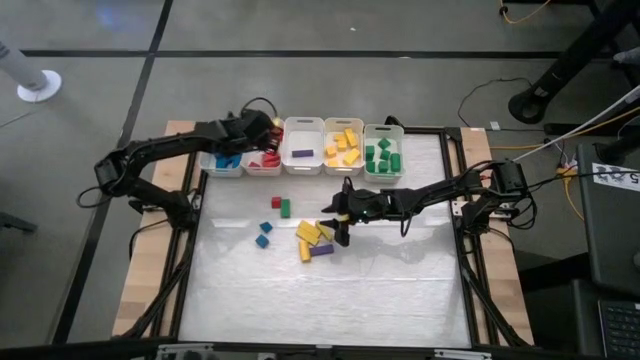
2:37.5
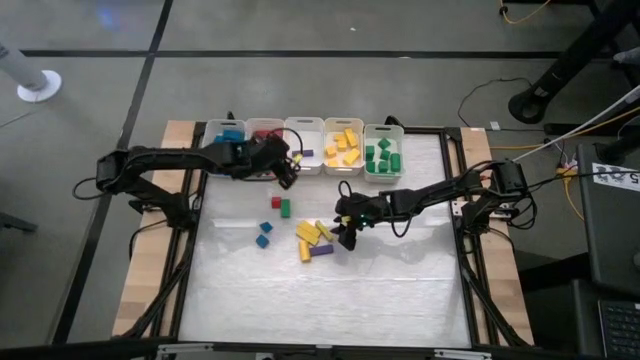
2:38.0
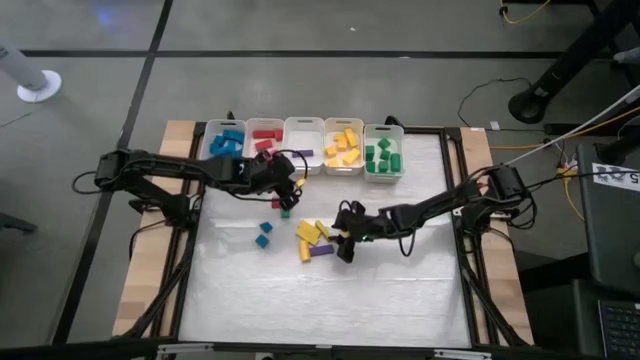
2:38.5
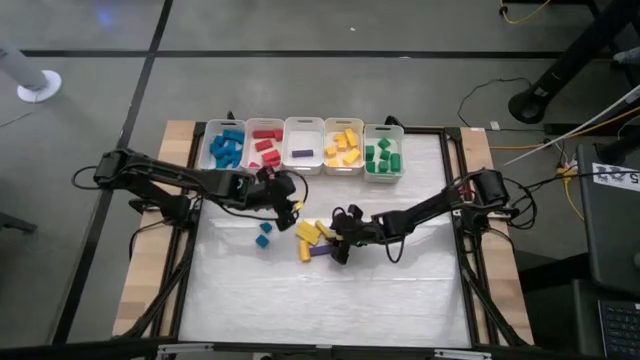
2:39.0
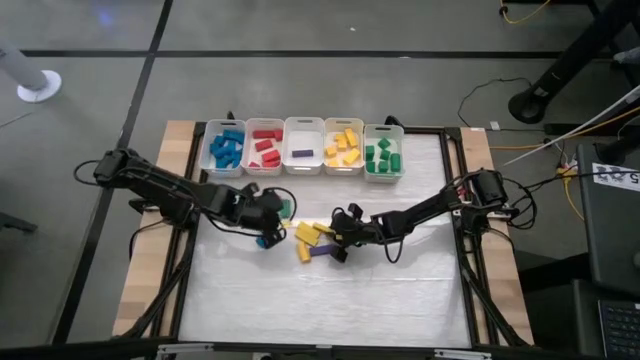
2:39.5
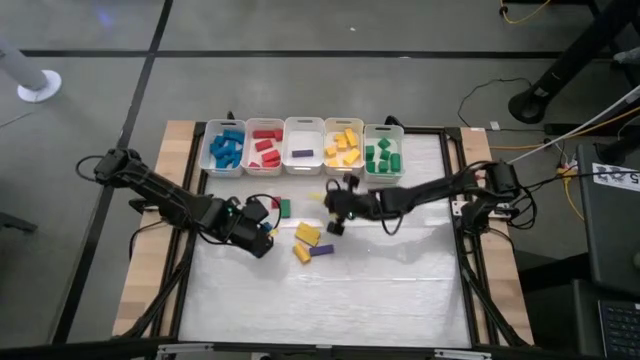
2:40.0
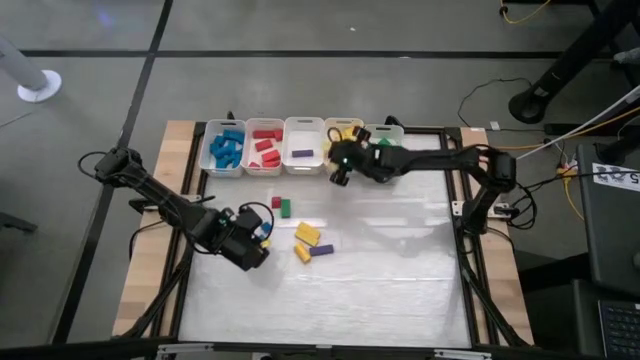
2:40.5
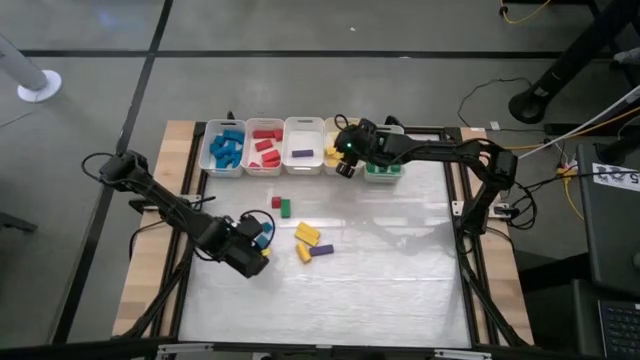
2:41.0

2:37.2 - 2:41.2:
Task: Sort blocks
Put the yellow block into the middle right white bin

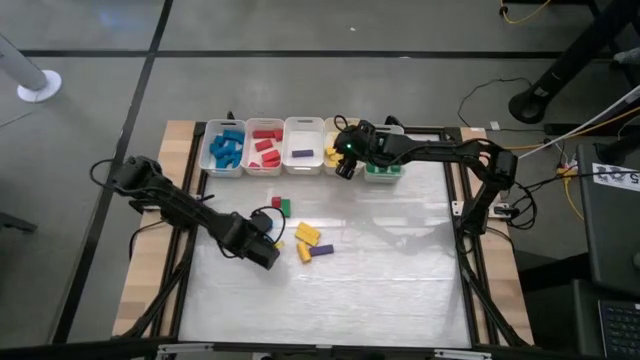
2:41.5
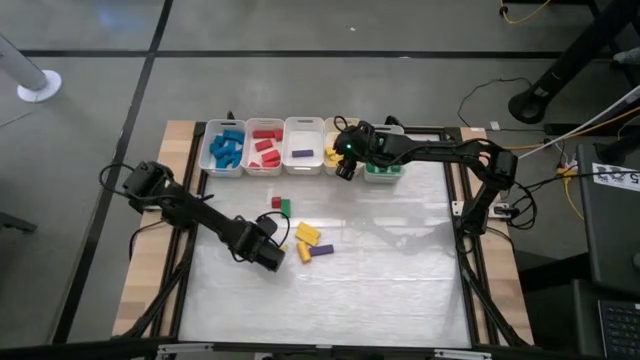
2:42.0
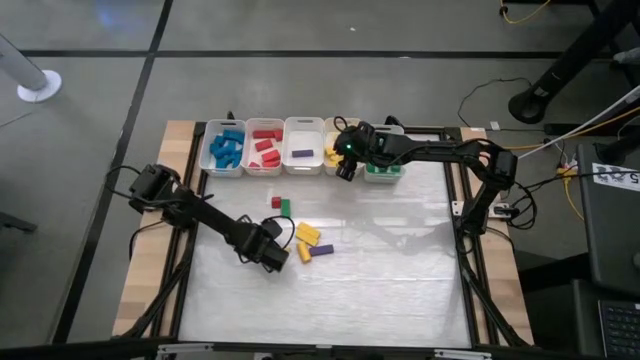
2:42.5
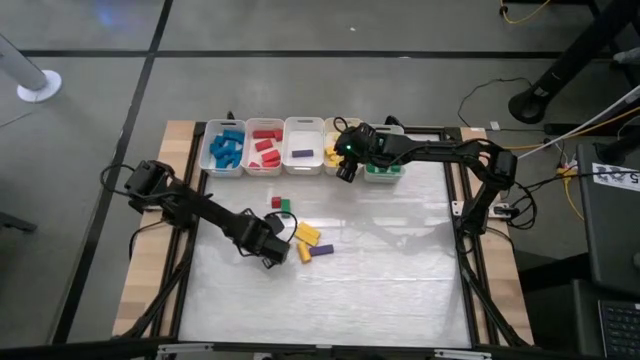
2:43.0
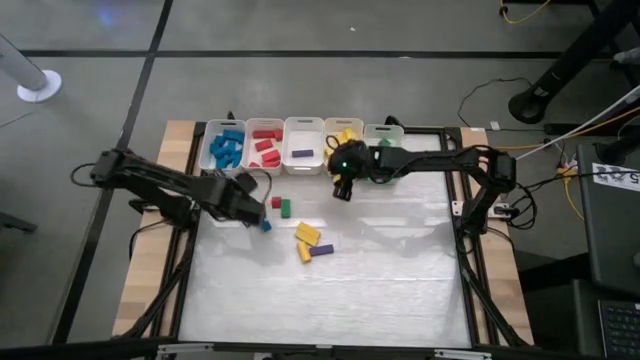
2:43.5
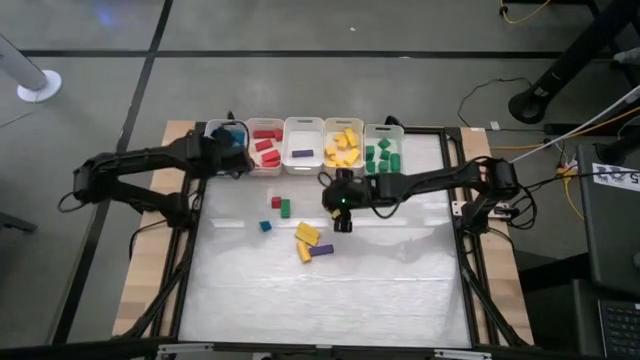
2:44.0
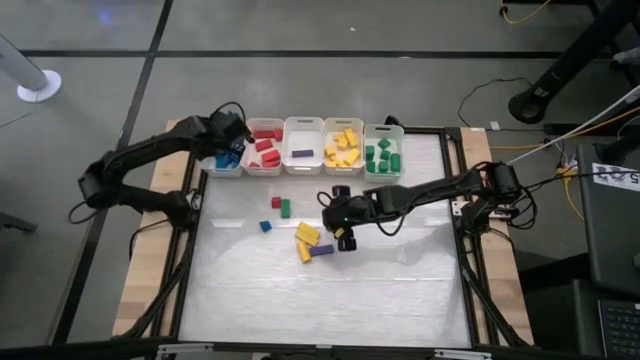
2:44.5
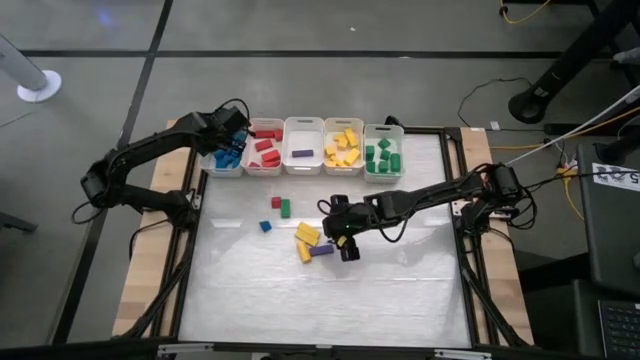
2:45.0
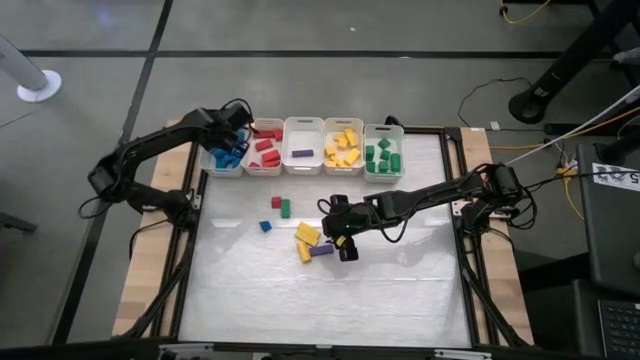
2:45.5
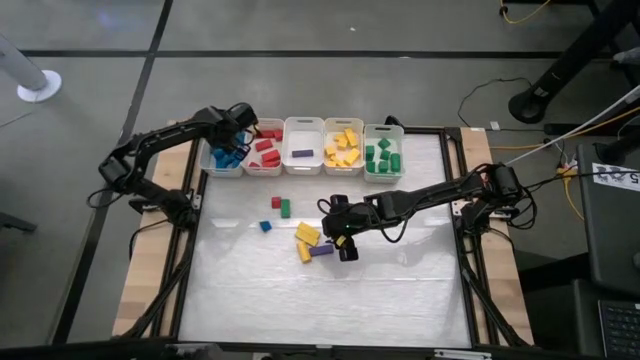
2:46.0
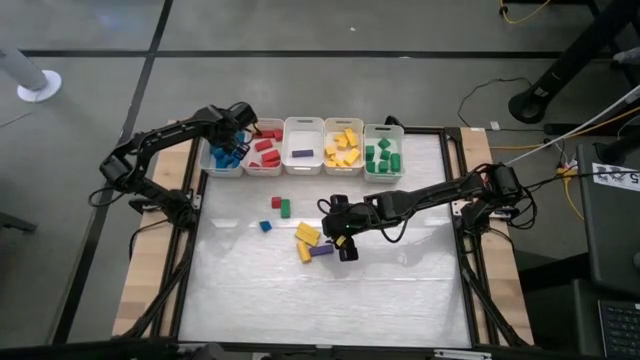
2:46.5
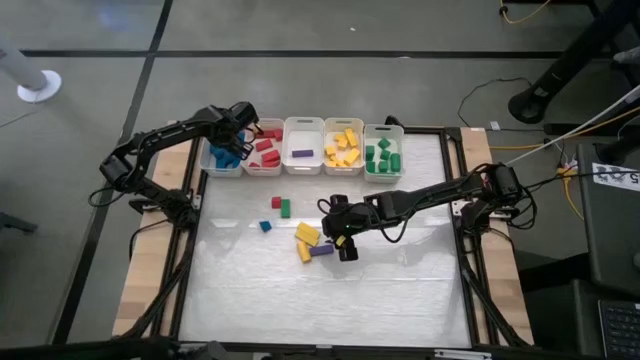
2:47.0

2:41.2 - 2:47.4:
Put the blue block into the left white bin

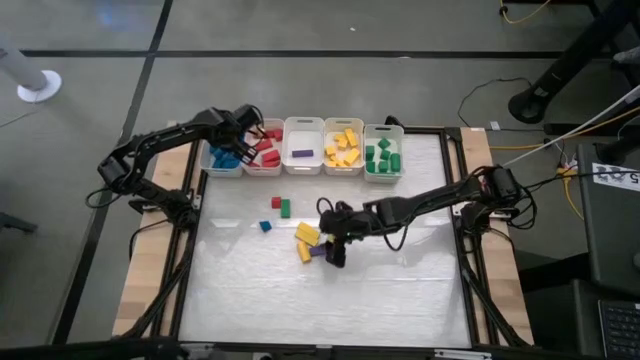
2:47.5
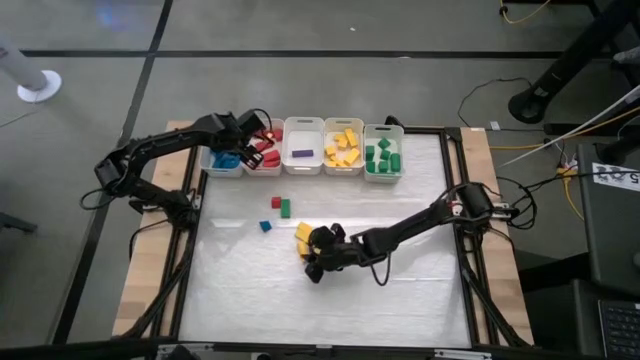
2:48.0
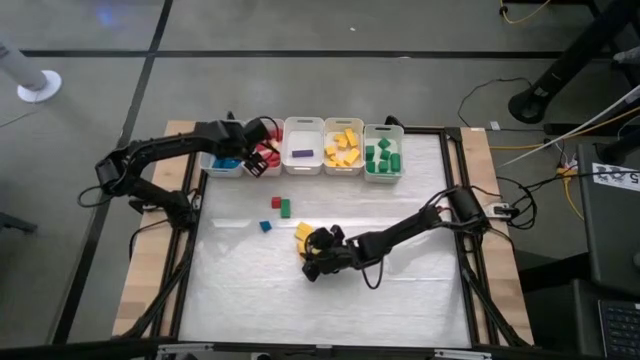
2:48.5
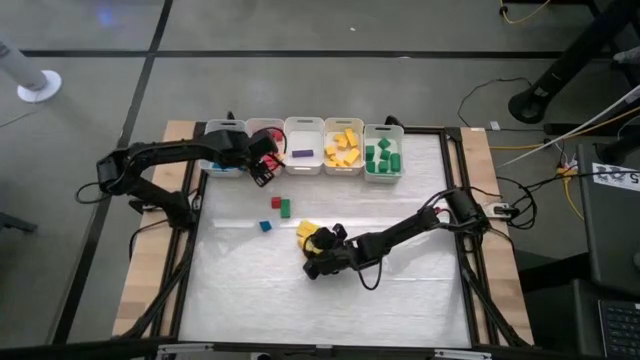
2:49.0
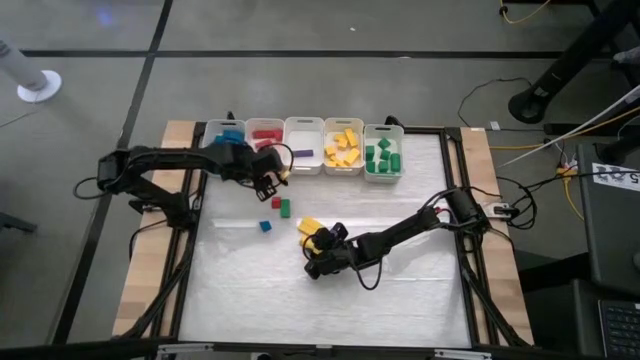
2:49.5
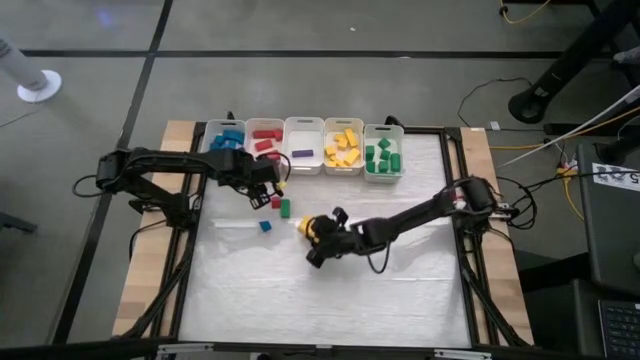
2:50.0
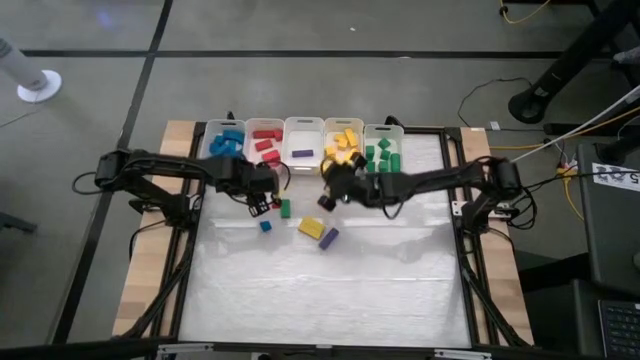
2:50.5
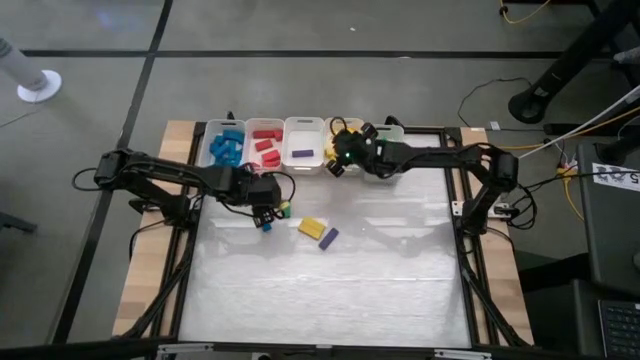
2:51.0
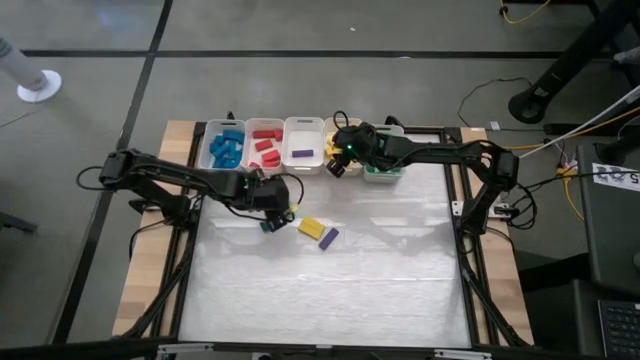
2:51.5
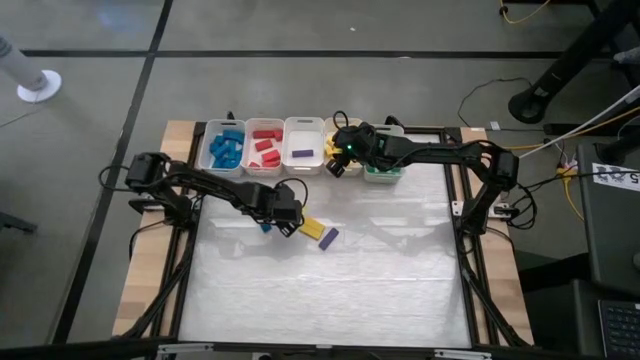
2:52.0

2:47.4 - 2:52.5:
Put the yellow block into the middle right white bin

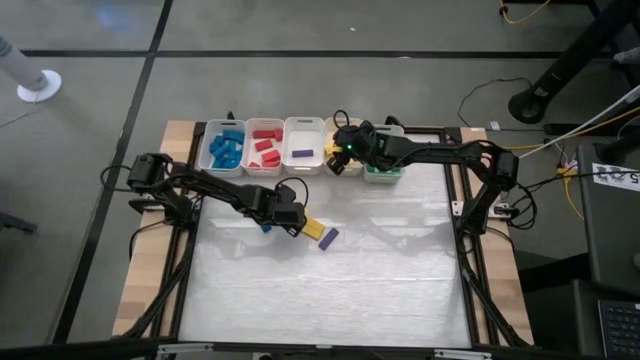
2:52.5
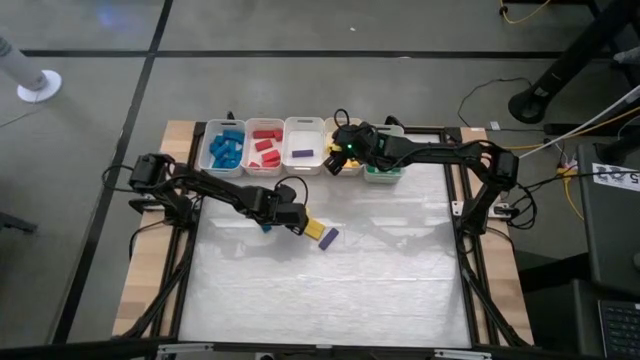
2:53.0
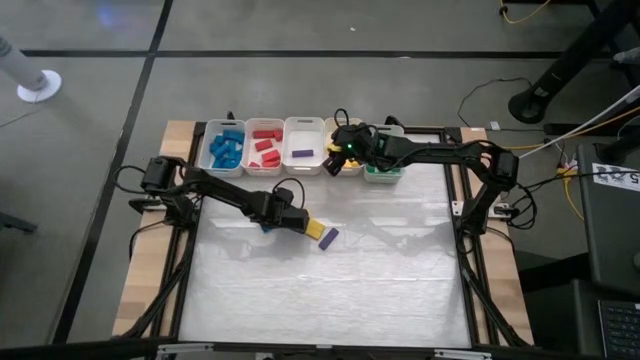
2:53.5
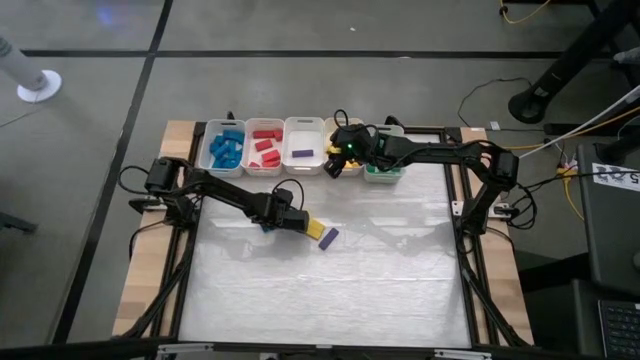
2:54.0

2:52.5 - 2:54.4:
Put the green block into the white bin

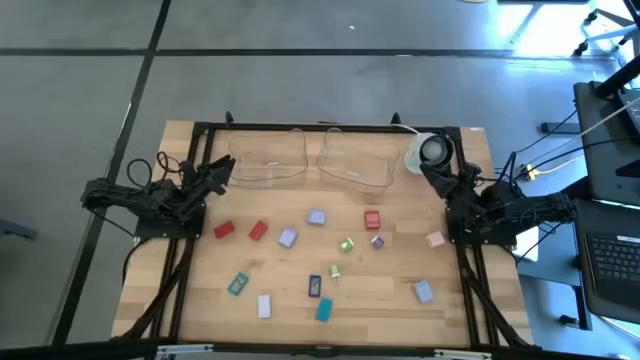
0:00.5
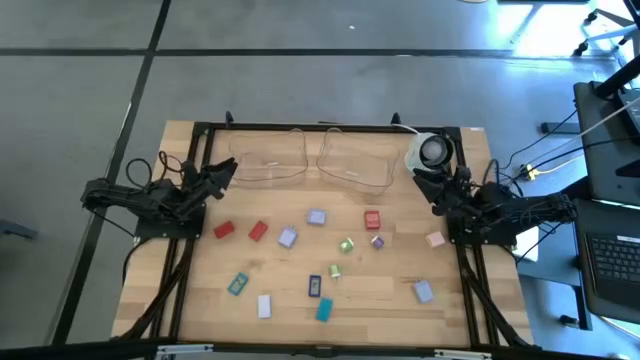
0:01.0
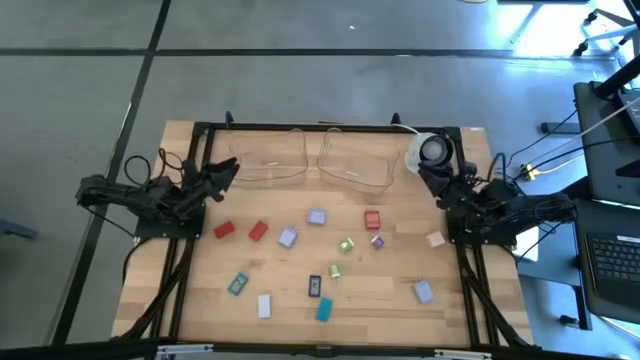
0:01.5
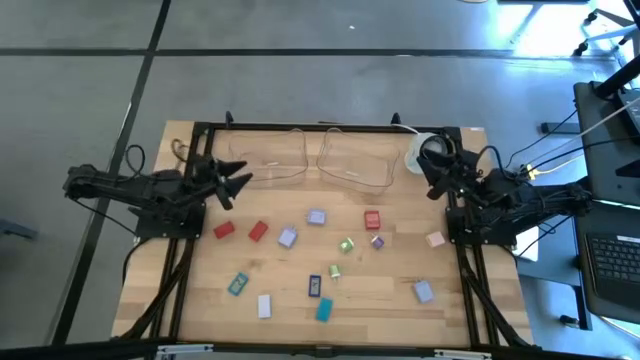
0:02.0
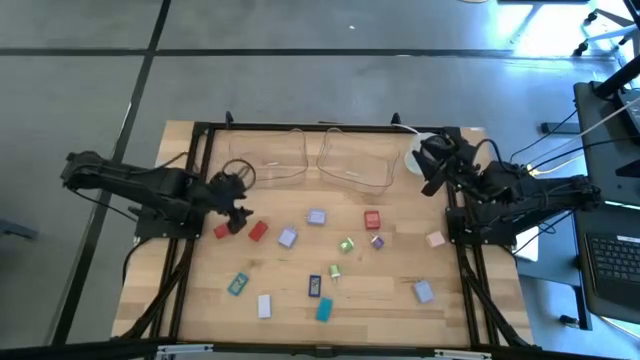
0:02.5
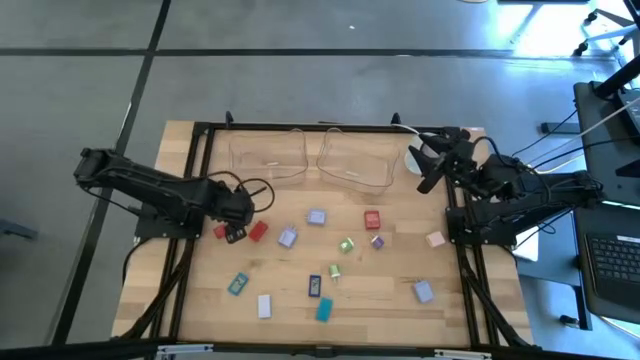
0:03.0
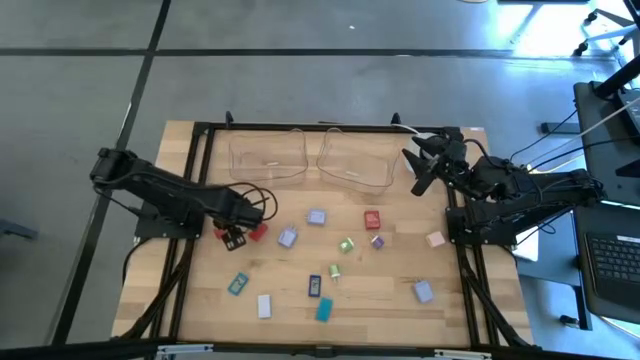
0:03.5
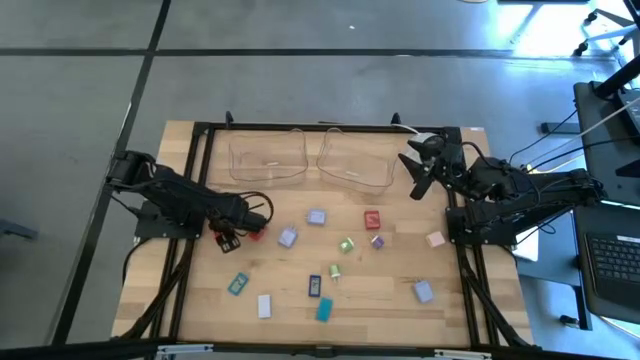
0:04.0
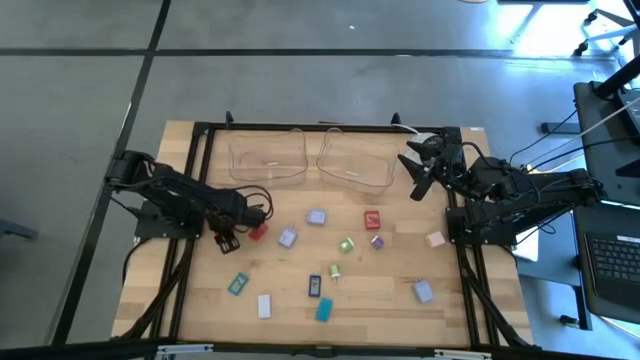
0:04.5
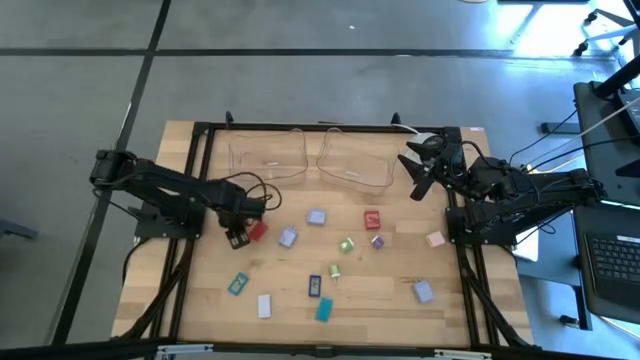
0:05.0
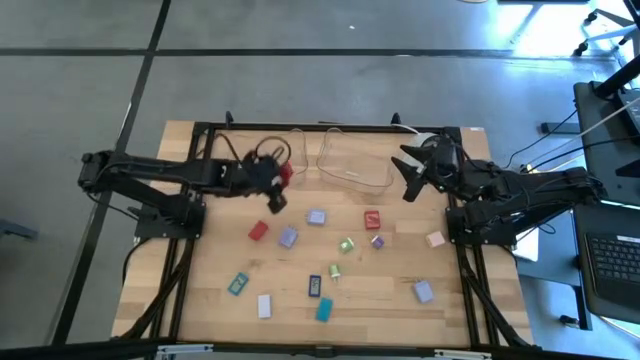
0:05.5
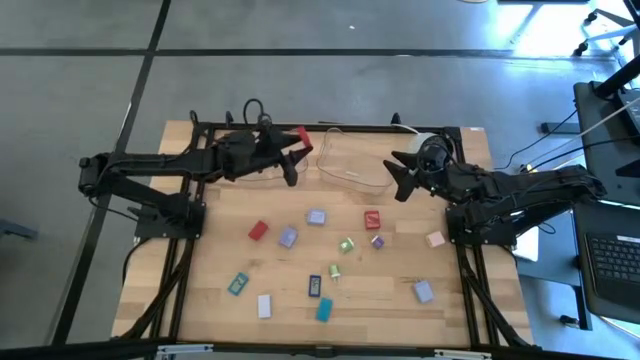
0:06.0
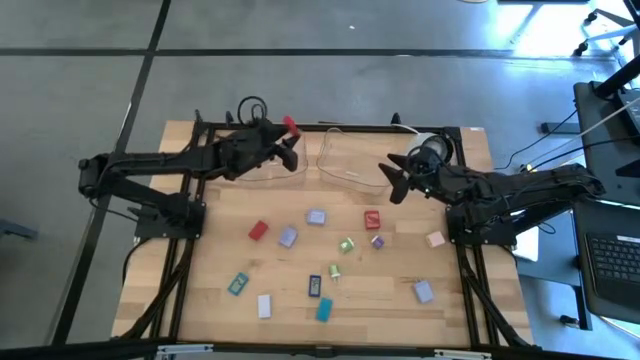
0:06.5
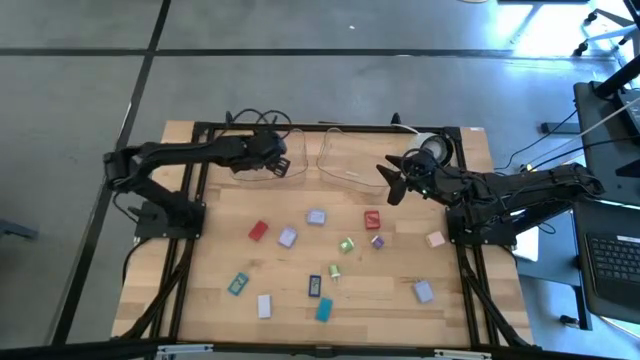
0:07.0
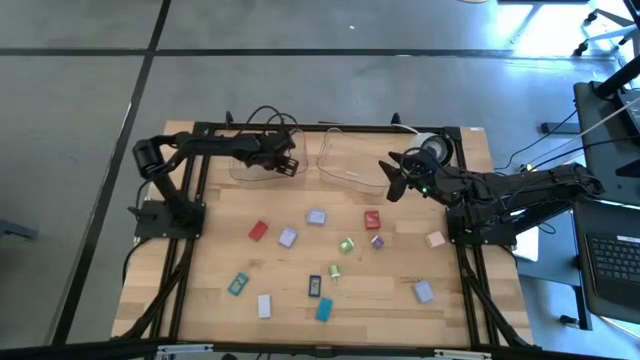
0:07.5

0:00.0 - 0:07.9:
Task: Pick & Place Office items
Put the left red digital timer into the left transparent bin
